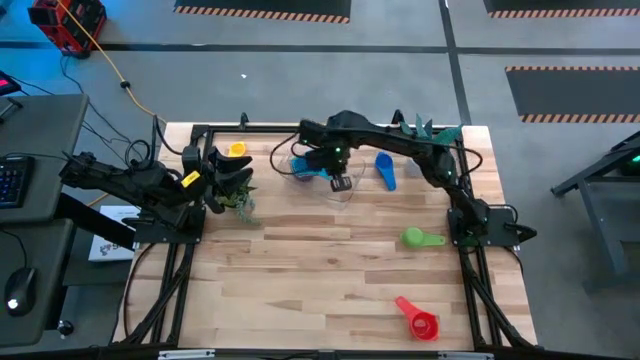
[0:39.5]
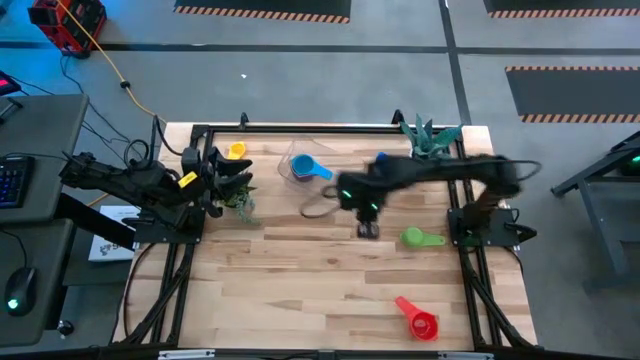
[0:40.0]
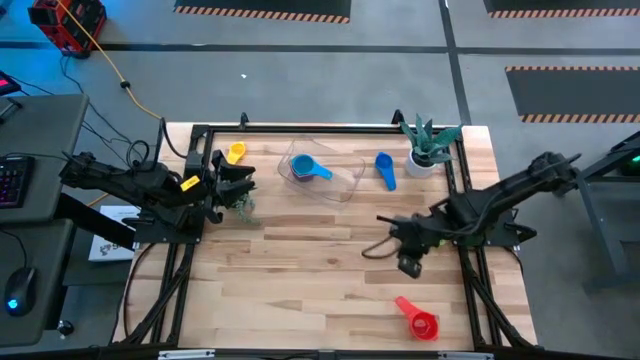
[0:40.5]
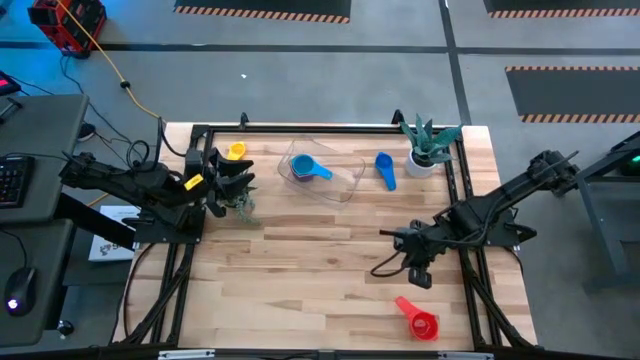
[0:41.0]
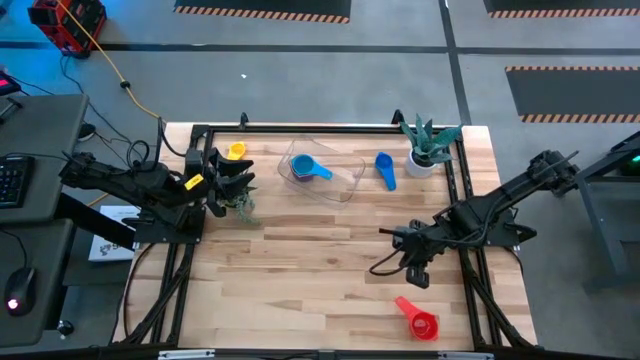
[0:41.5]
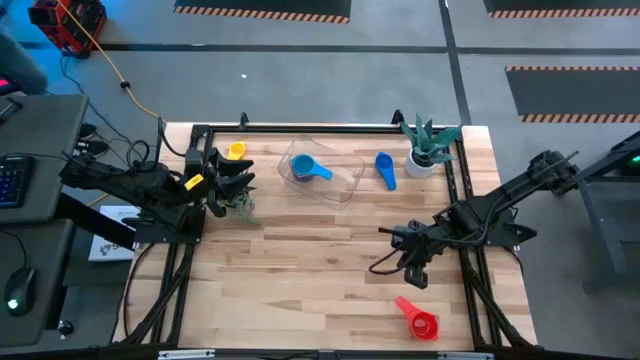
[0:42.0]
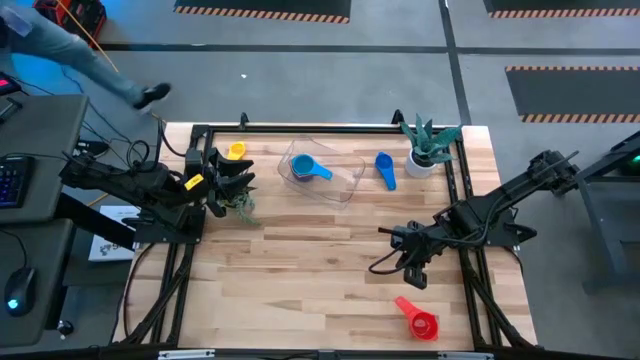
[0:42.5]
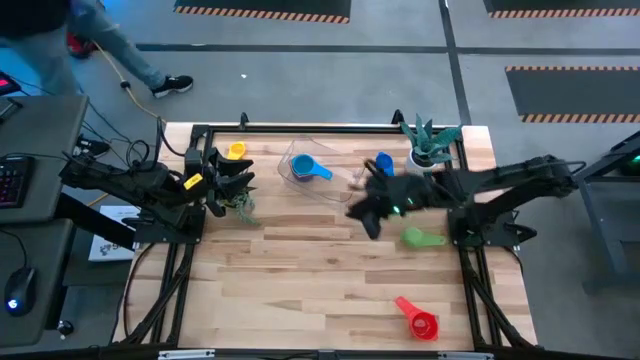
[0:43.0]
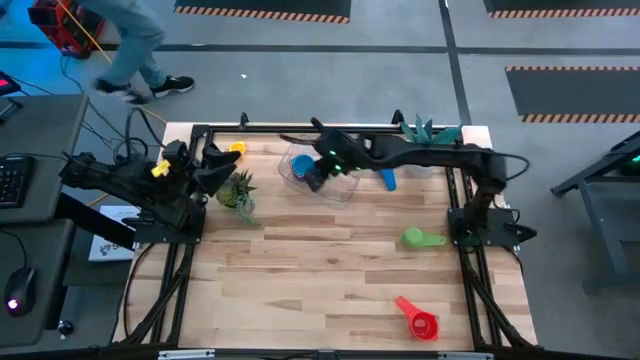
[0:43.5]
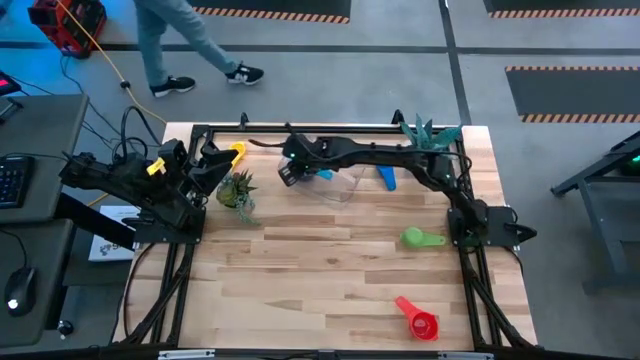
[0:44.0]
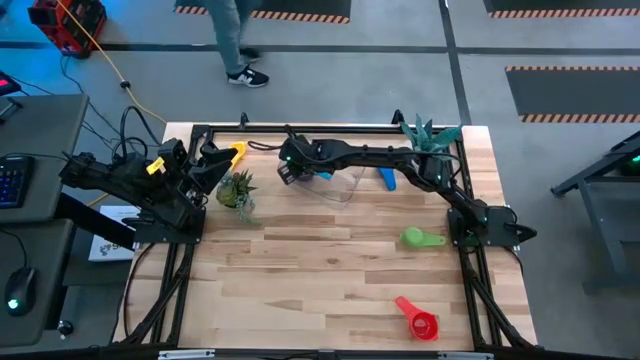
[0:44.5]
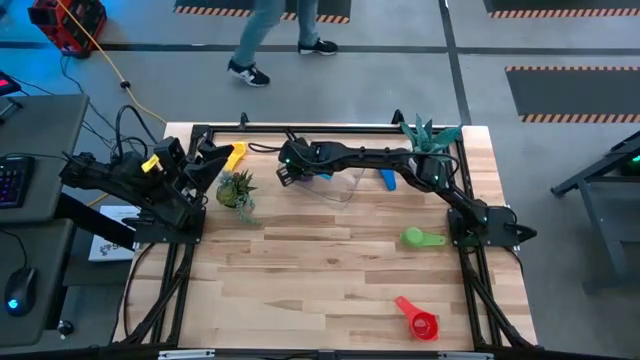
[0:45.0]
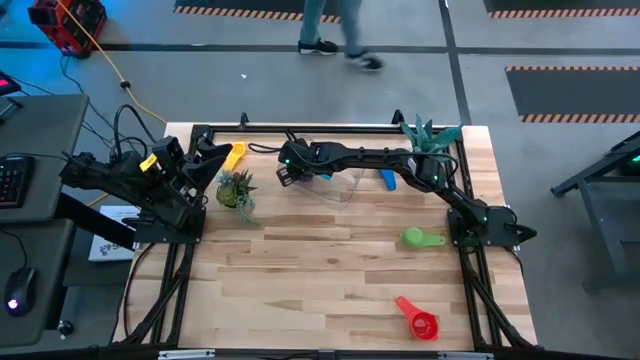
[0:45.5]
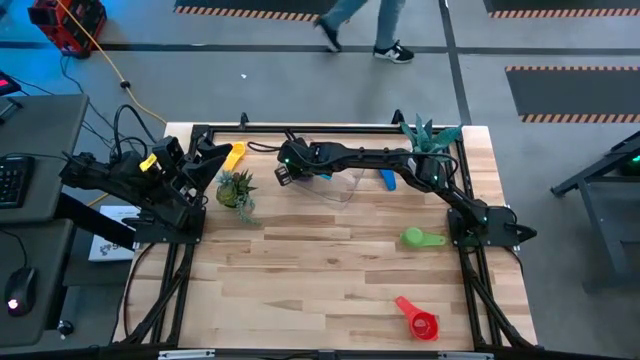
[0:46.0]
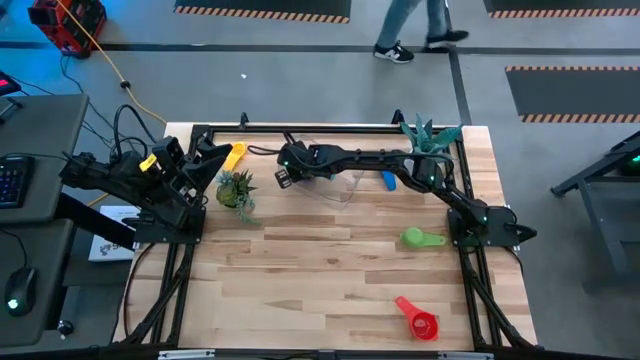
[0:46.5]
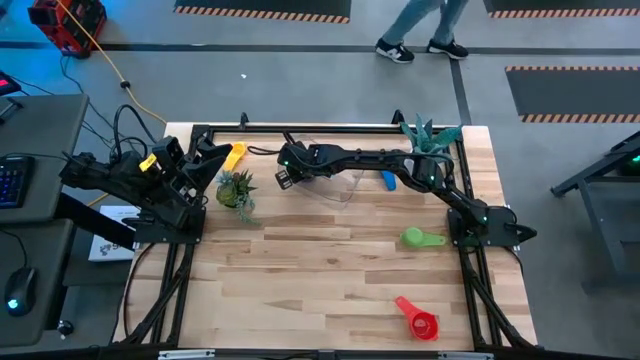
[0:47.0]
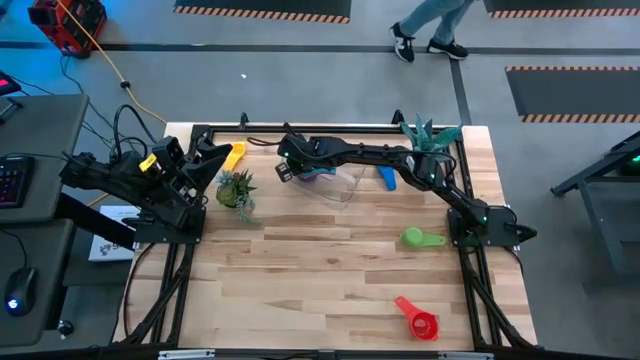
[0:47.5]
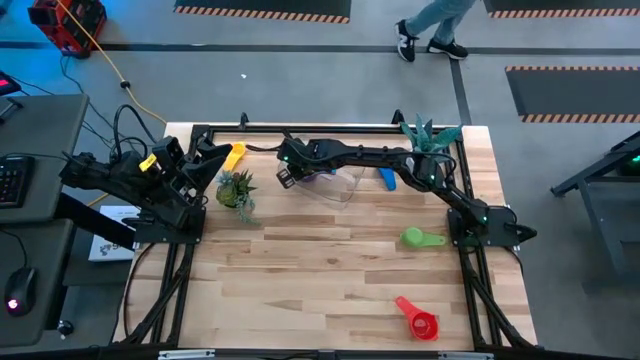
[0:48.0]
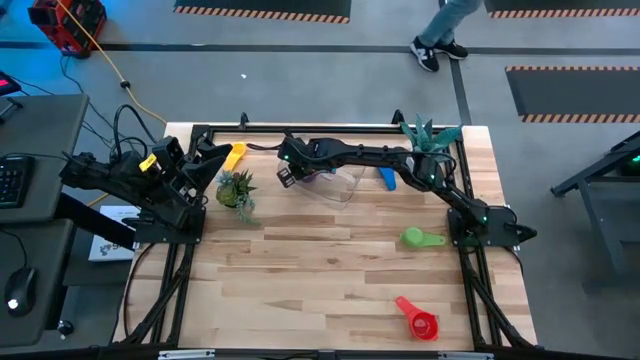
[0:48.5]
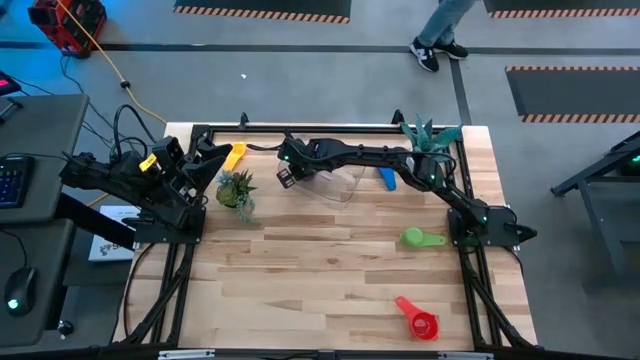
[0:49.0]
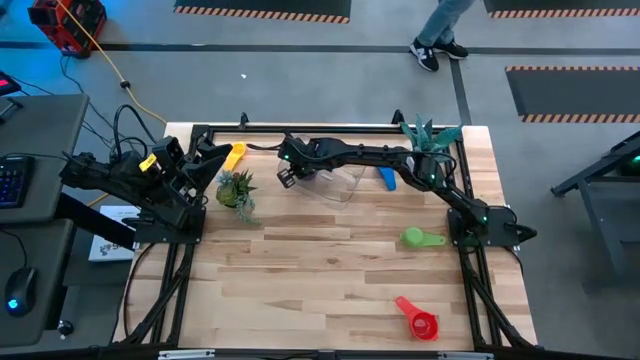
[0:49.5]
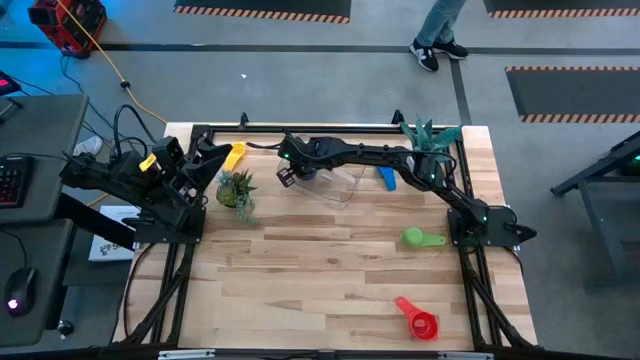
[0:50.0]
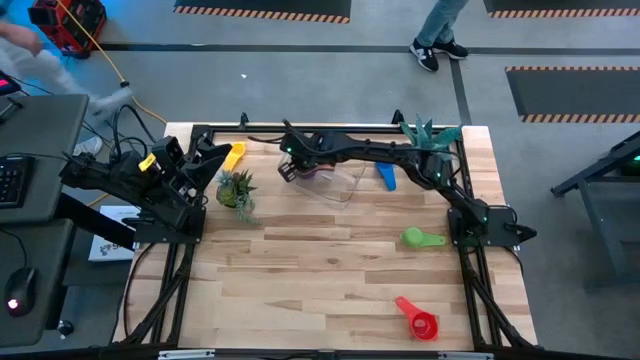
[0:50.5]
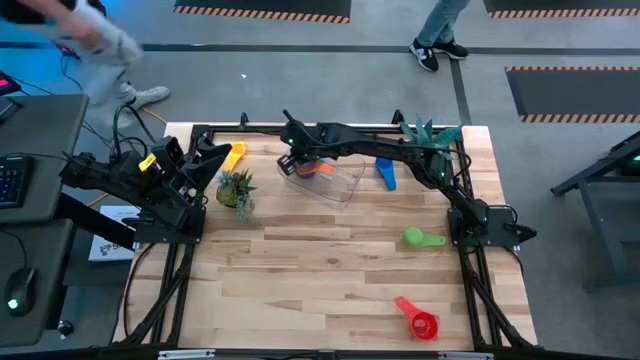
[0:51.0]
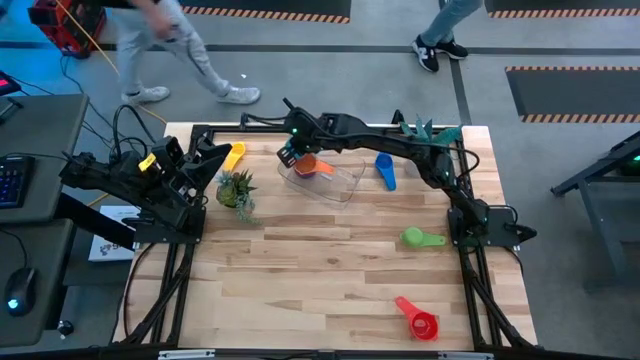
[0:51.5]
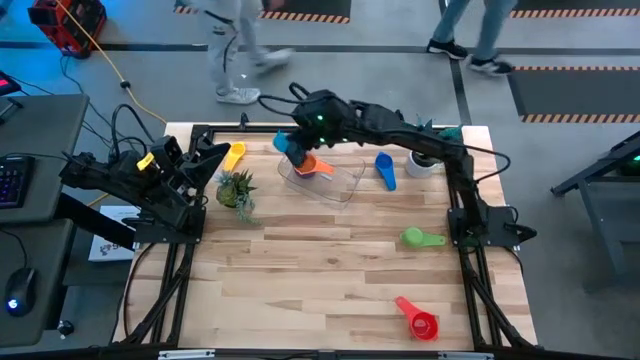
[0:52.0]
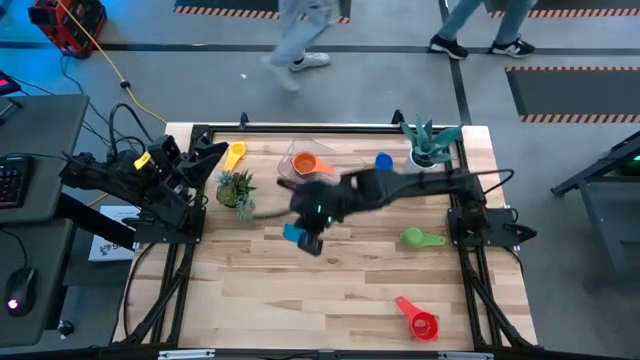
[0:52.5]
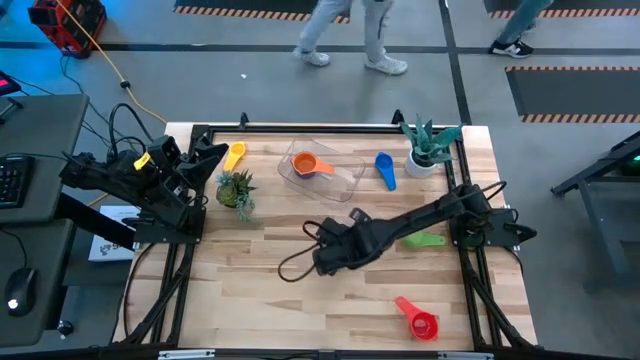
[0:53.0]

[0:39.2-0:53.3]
Task: Nest measuring cups in basket
Remove the light blue measuring cup from the top of the orange measuring cup in the transparent bin

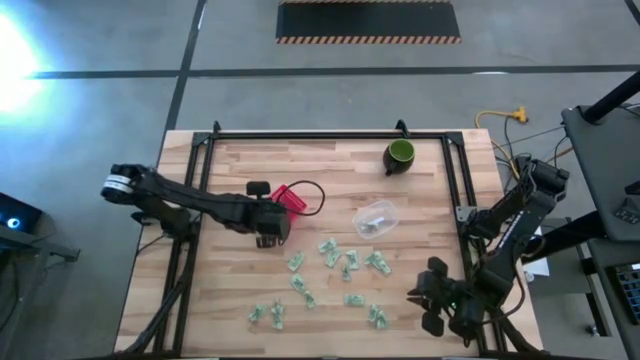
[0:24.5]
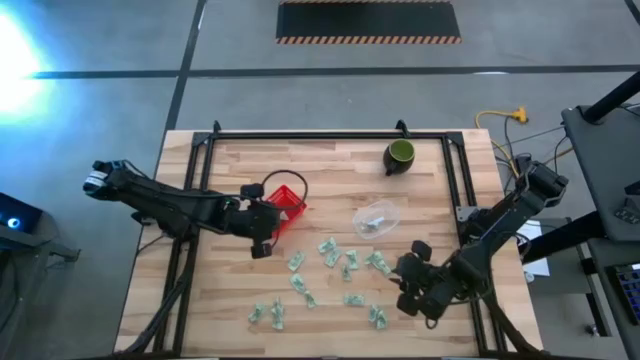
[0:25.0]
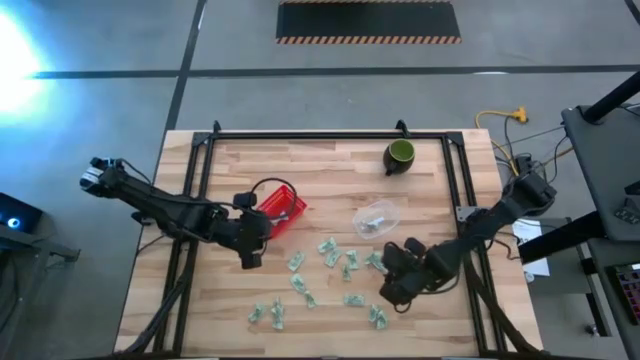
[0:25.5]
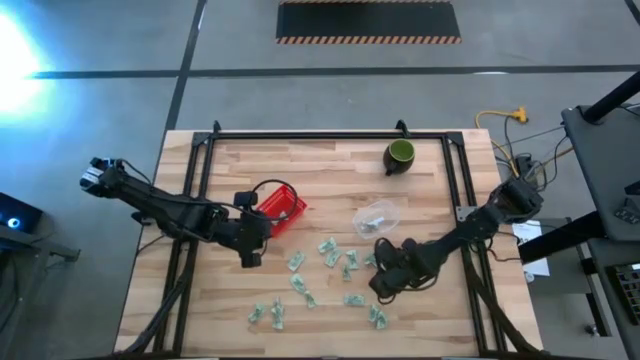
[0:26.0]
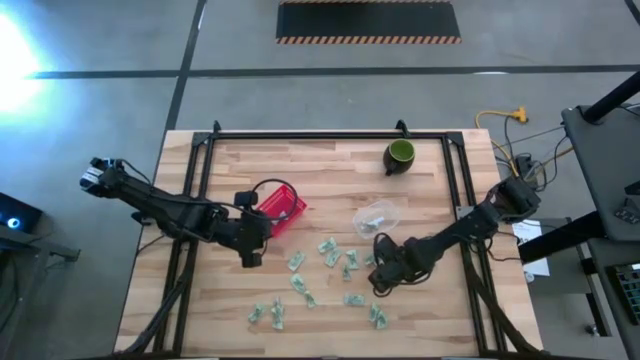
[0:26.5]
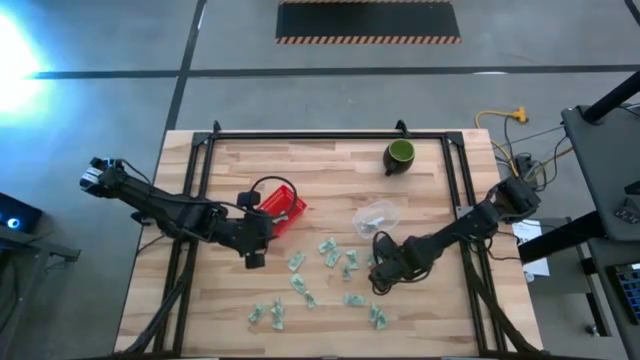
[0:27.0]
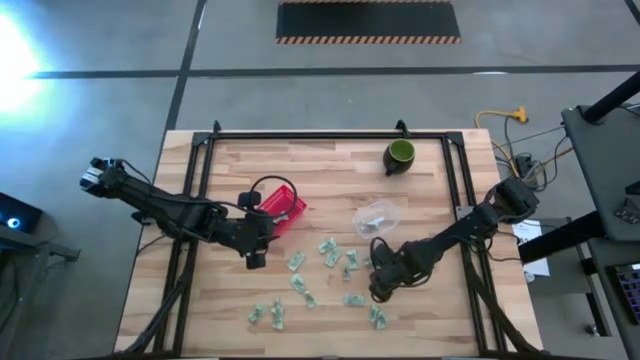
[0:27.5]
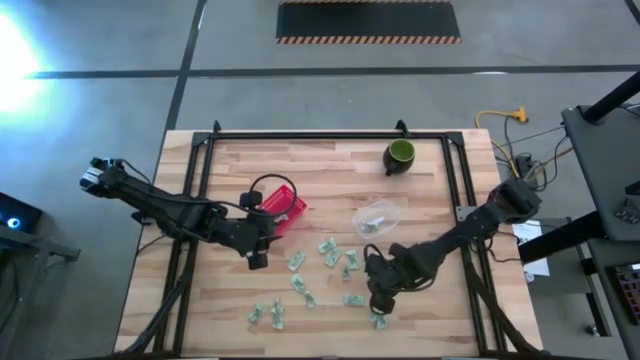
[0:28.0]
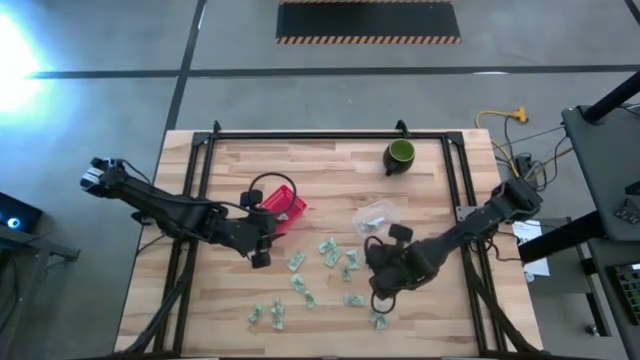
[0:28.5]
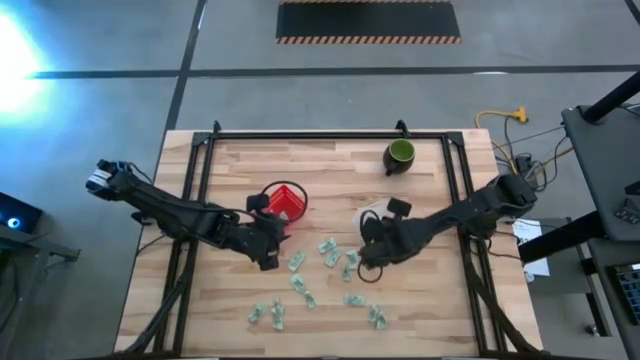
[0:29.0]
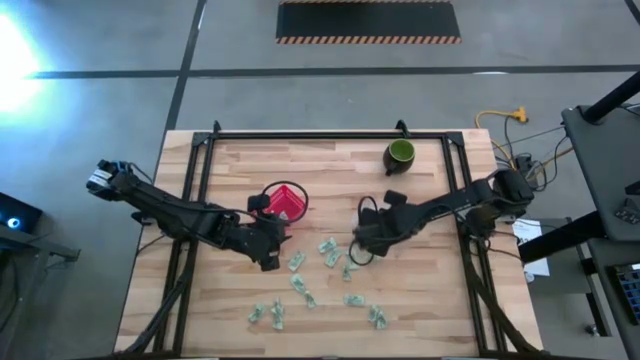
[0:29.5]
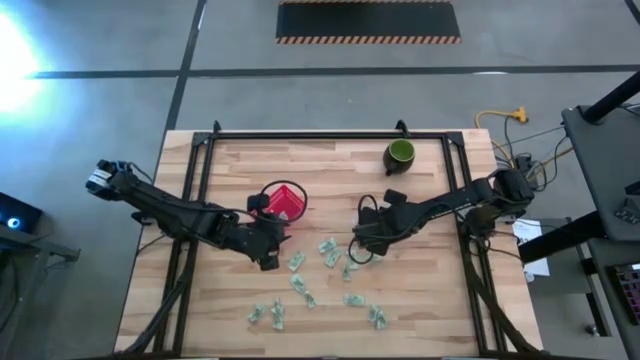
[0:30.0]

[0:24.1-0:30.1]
Task: Pick and place items into bin
Put the stevia packet into the transparent bin
